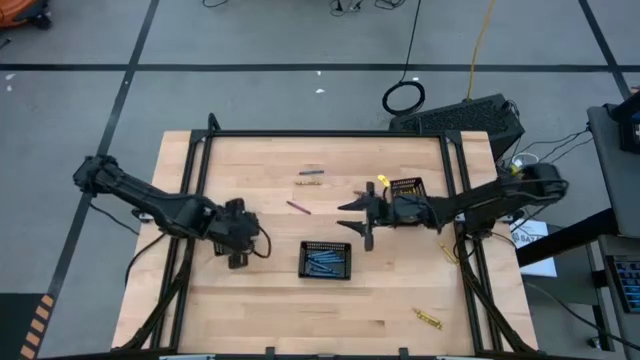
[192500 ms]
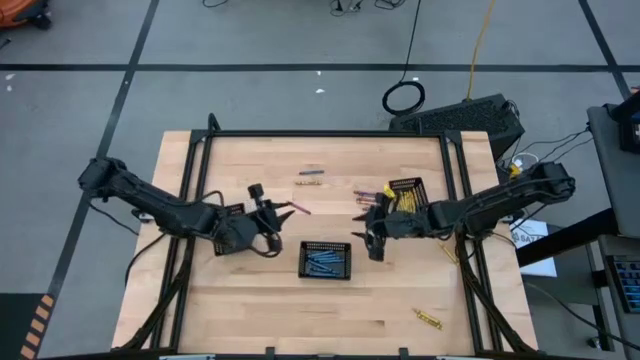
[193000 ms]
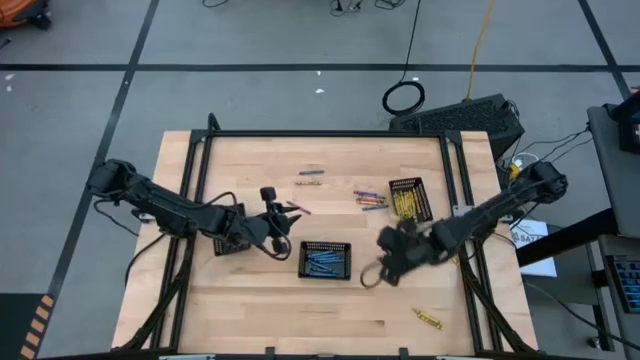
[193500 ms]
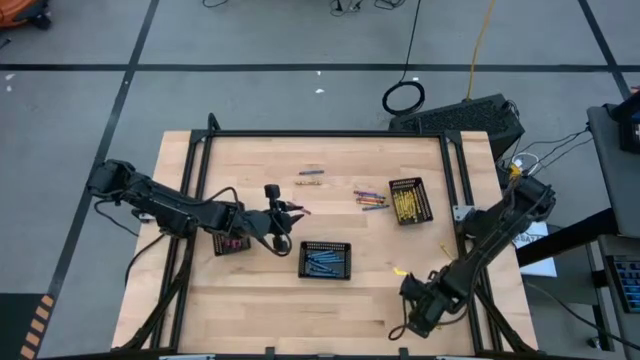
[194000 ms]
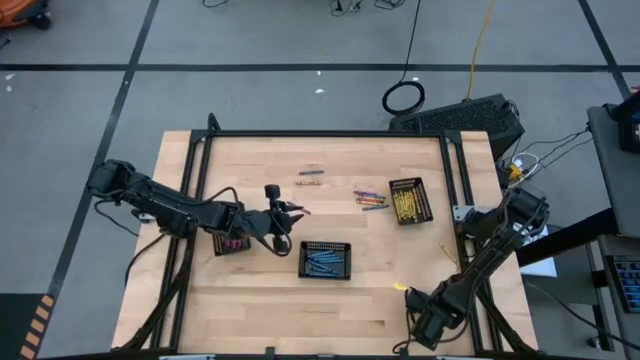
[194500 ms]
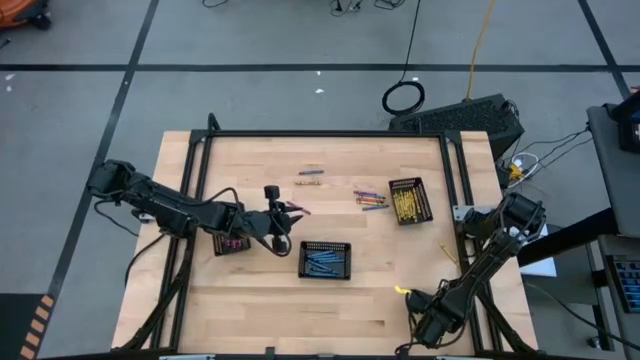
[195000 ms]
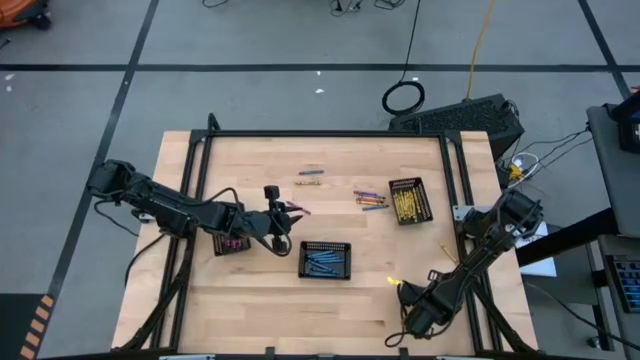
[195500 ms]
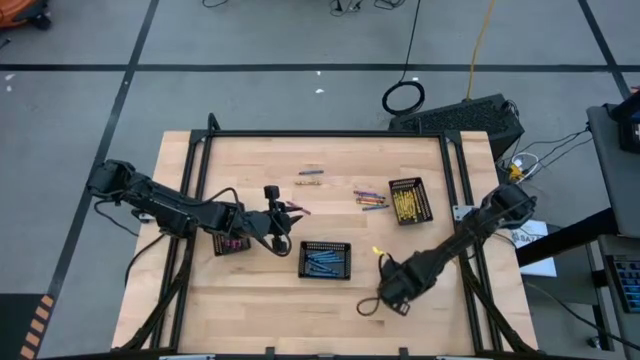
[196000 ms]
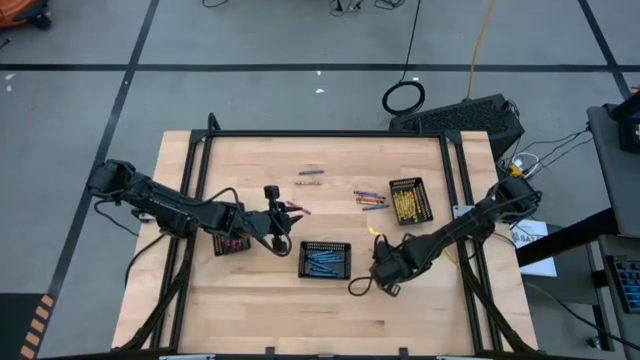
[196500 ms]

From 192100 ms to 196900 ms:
Task: Sort crayons
Put the yellow crayon into the right black basket

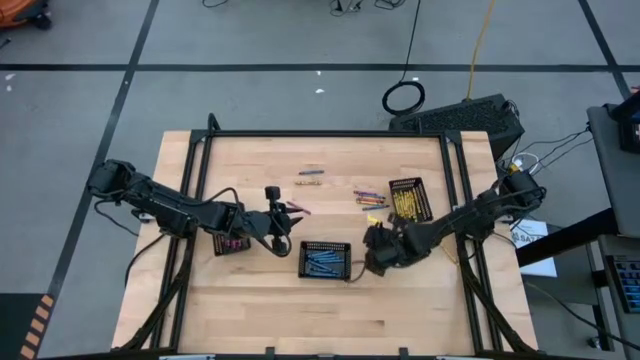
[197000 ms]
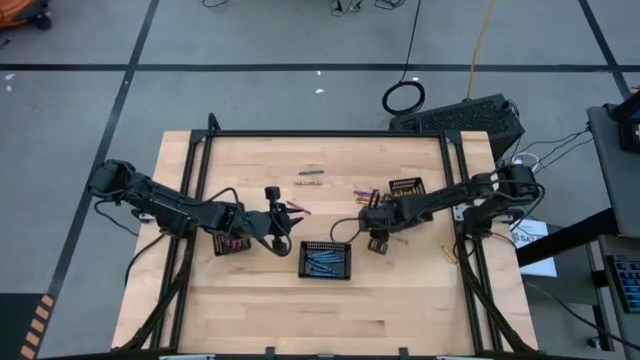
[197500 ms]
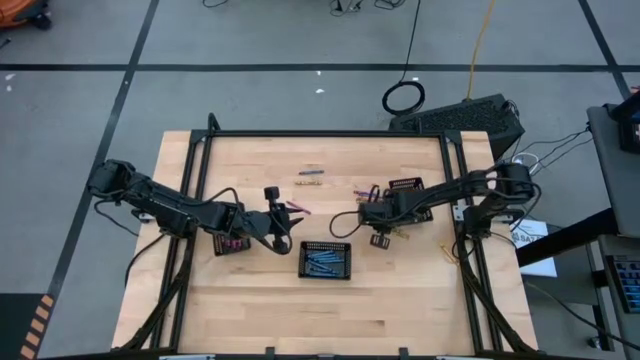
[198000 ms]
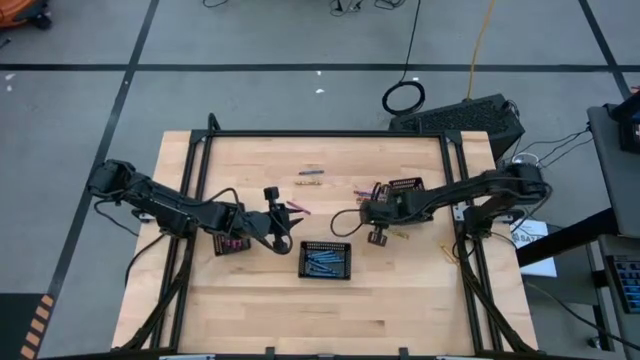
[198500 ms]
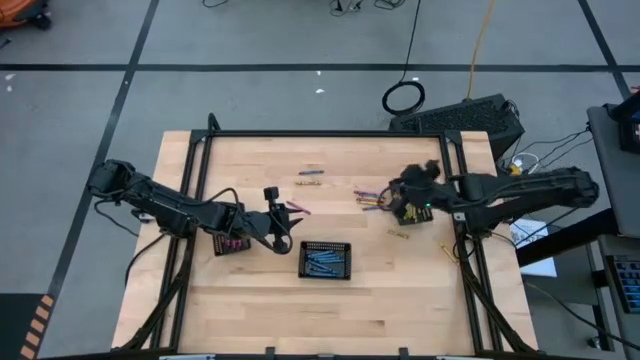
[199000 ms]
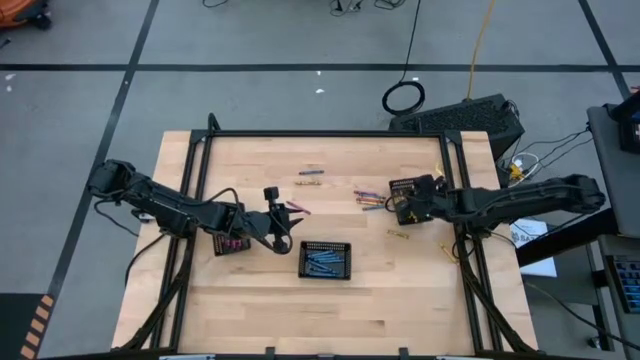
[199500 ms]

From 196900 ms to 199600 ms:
Put the yellow crayon into the right black basket

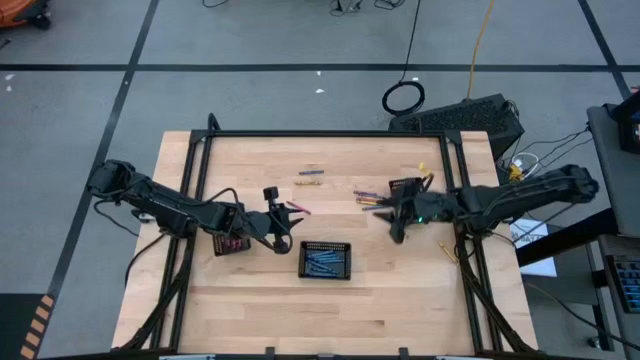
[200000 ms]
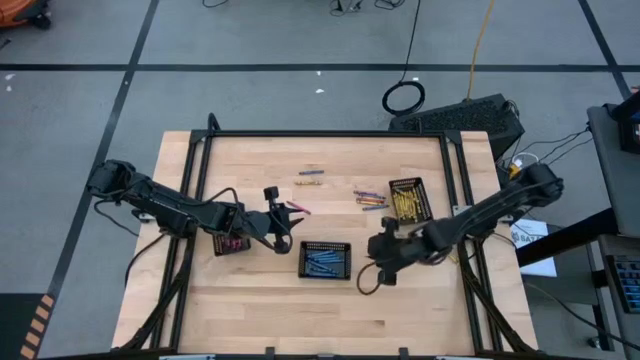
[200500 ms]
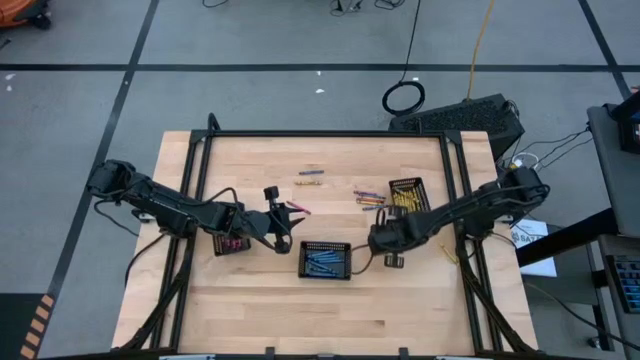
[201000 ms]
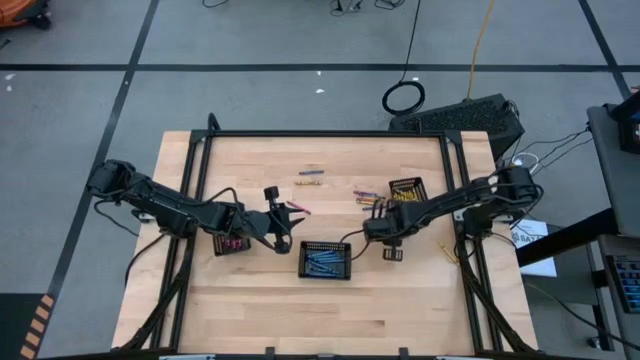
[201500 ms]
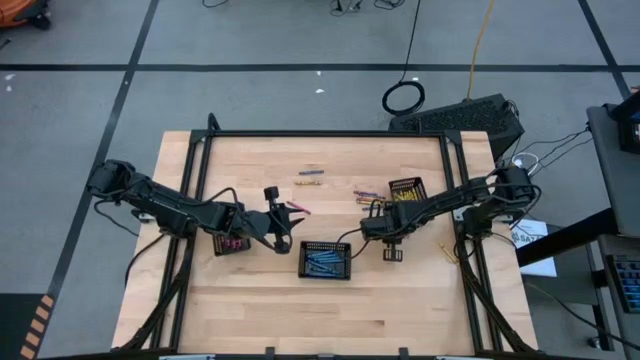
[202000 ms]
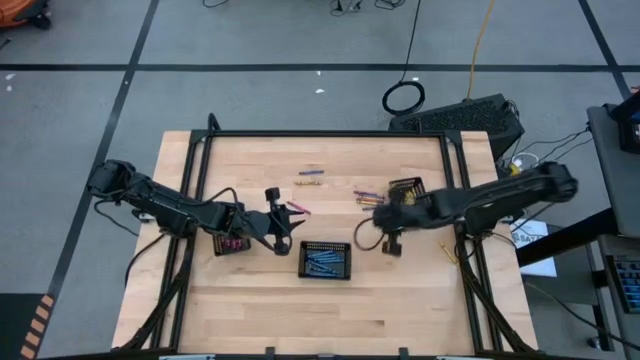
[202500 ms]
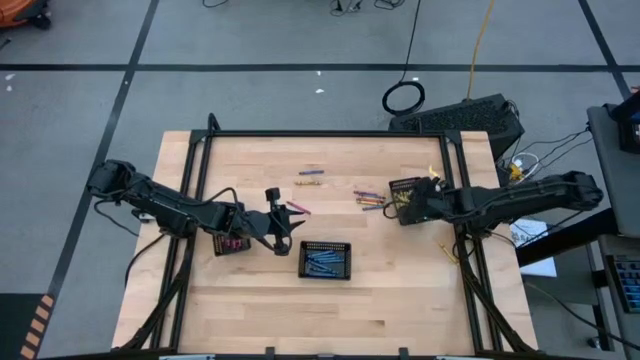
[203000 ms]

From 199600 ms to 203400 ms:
Put the yellow crayon into the right black basket

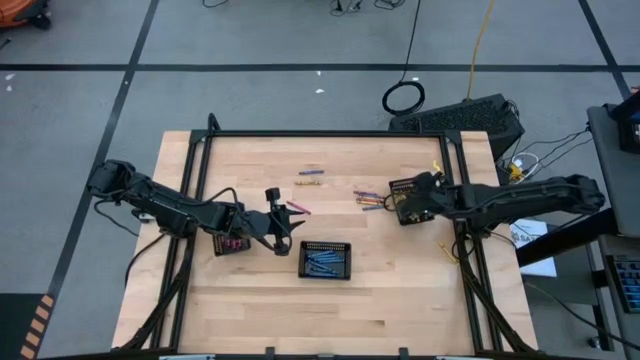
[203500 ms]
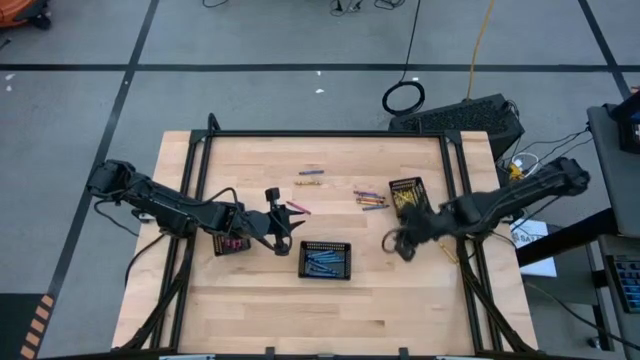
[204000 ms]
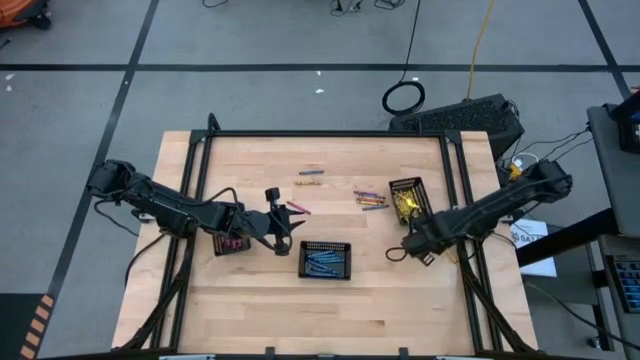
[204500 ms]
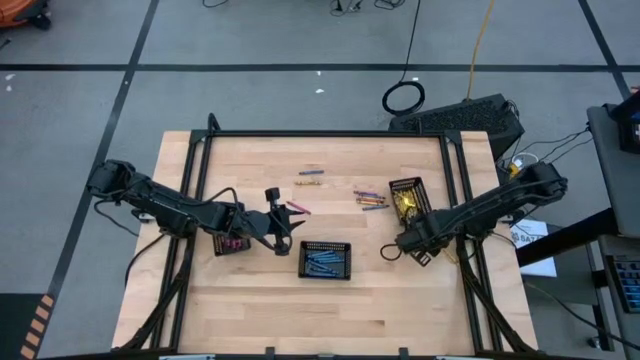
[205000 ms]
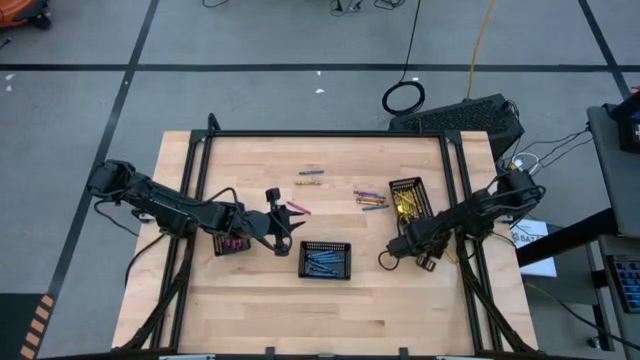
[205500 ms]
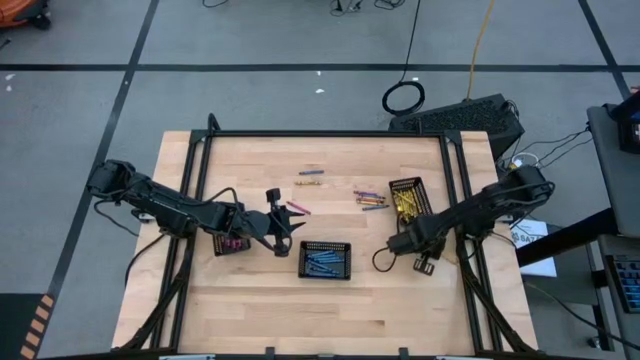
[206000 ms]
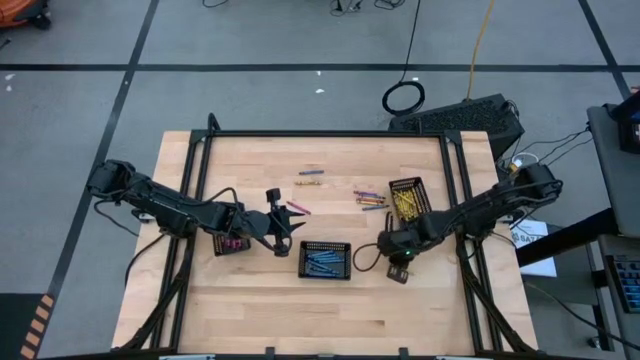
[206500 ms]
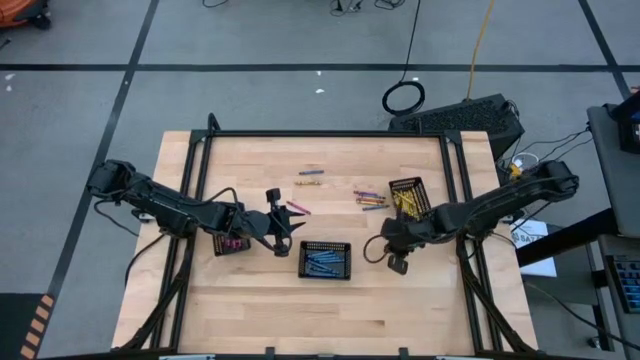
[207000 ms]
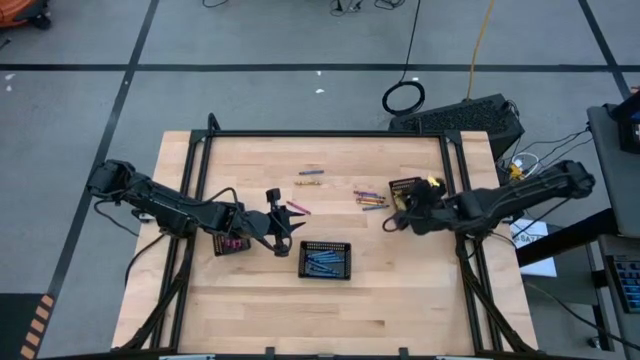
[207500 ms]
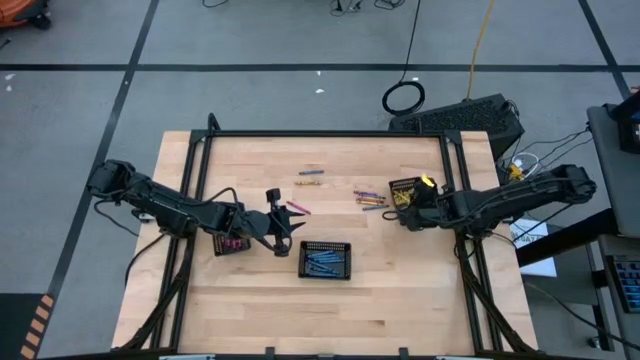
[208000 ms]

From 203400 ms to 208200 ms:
Put the yellow crayon into the right black basket

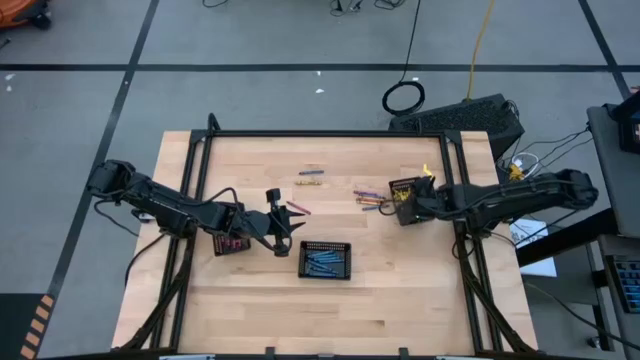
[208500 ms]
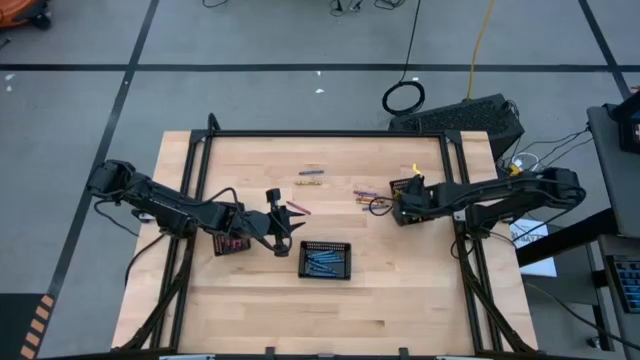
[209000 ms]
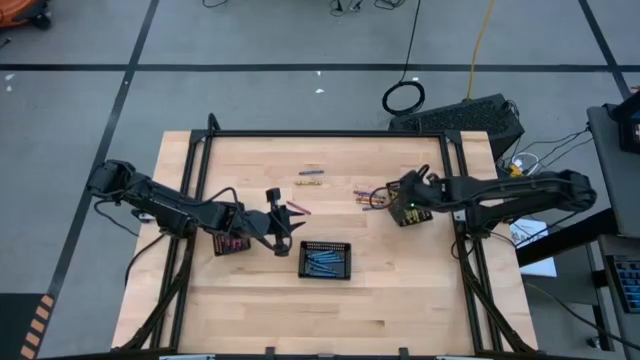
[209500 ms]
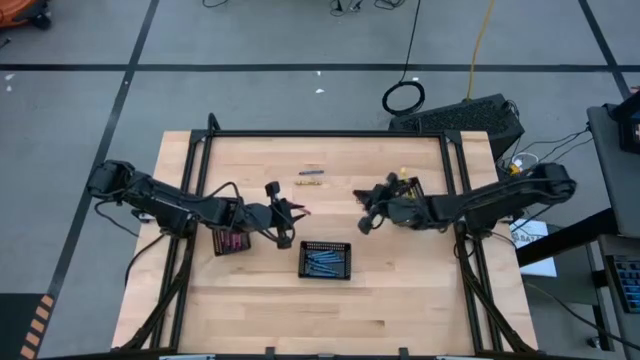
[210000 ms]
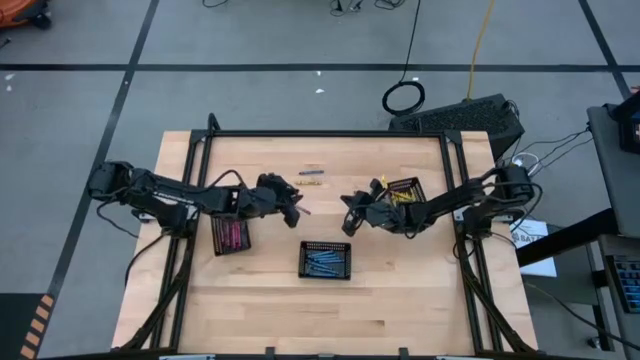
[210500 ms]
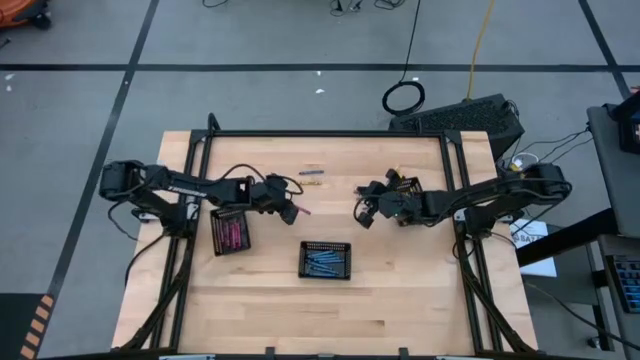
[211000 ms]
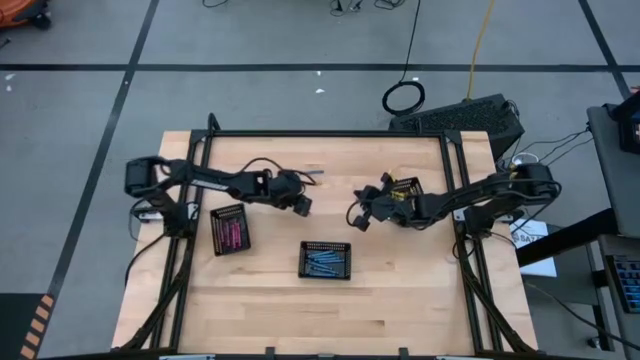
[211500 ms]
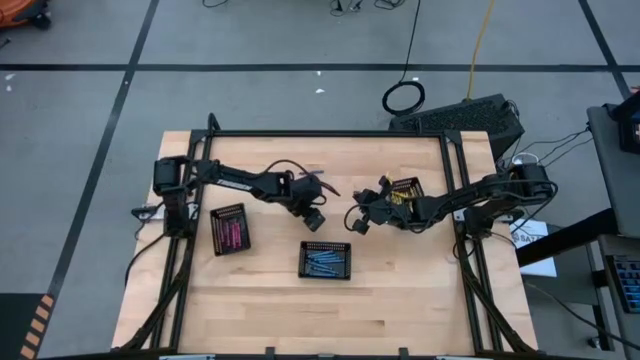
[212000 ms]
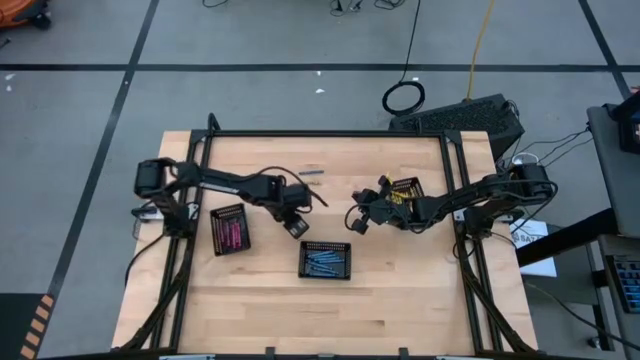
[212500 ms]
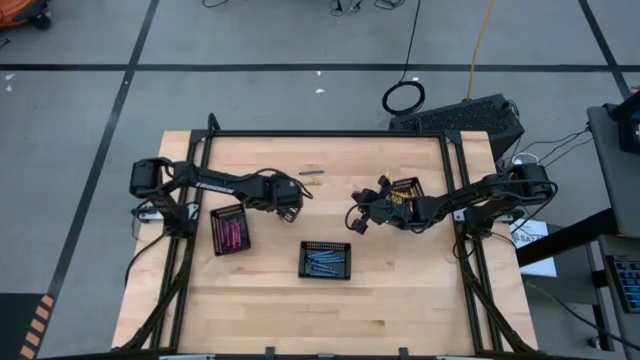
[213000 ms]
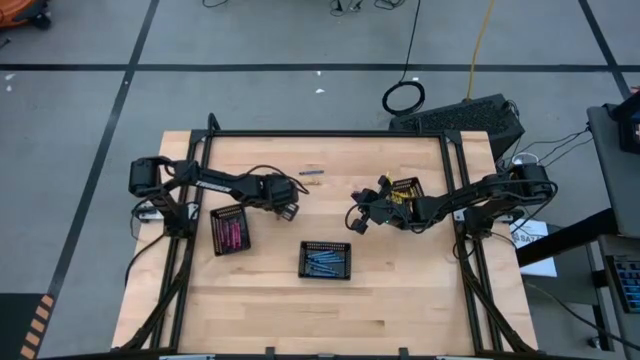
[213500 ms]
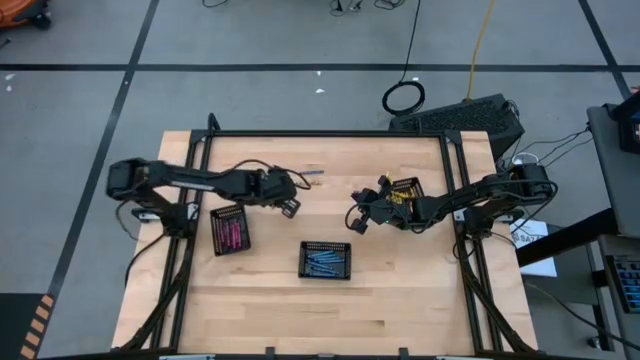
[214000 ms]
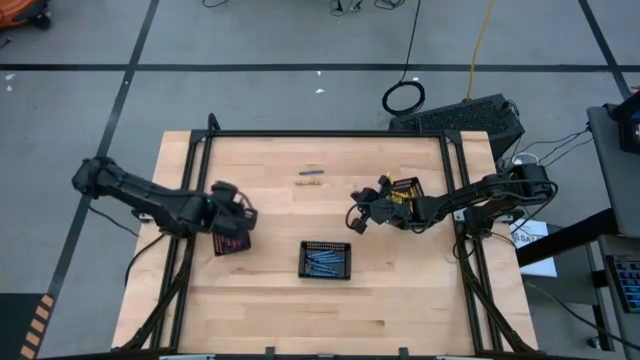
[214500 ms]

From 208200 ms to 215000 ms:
Put the red crayon into the left black basket
